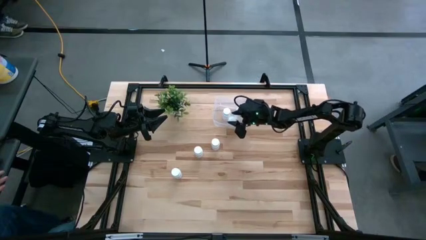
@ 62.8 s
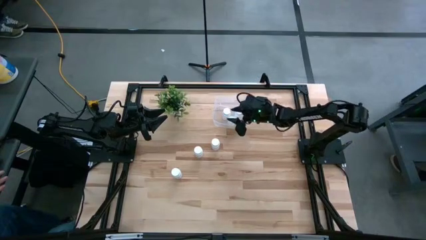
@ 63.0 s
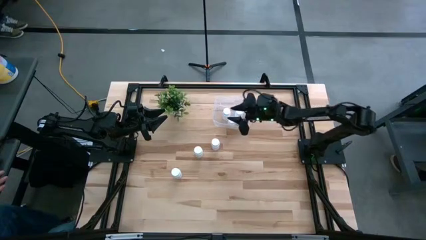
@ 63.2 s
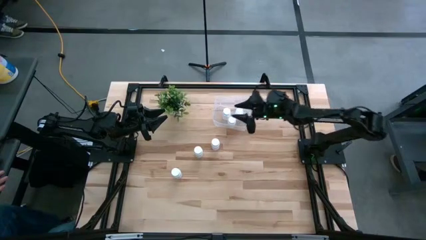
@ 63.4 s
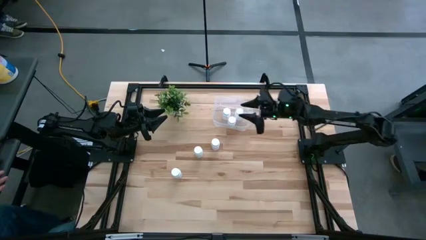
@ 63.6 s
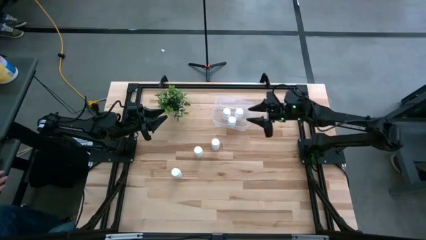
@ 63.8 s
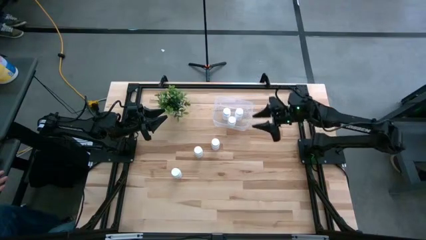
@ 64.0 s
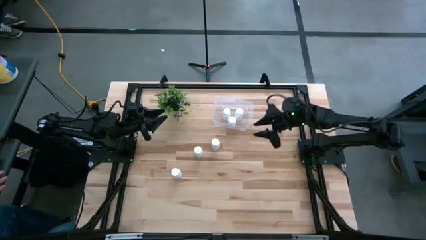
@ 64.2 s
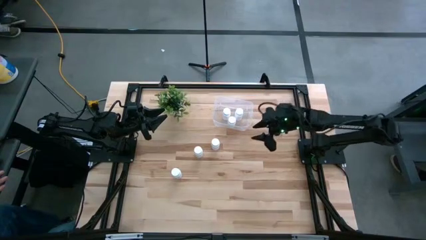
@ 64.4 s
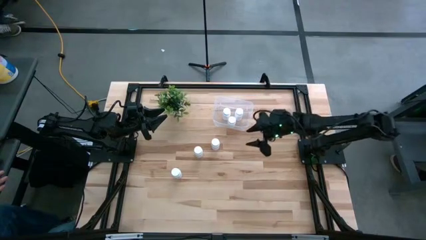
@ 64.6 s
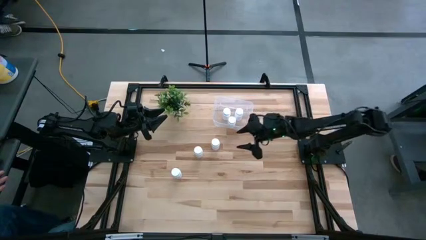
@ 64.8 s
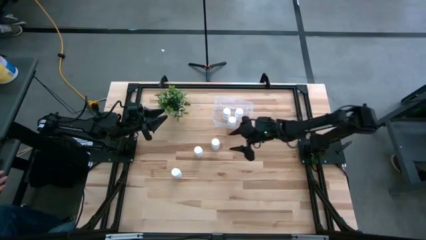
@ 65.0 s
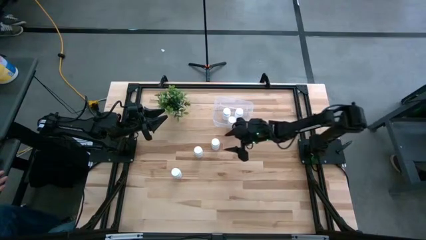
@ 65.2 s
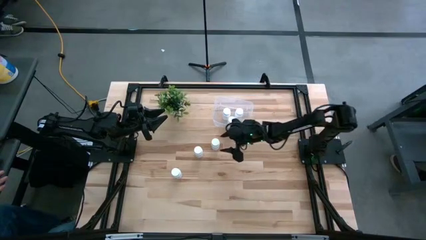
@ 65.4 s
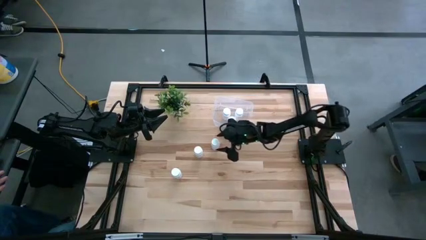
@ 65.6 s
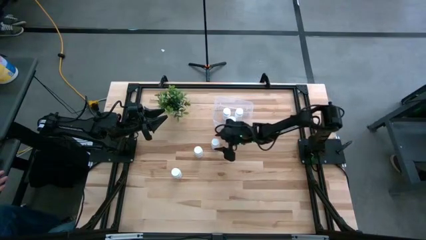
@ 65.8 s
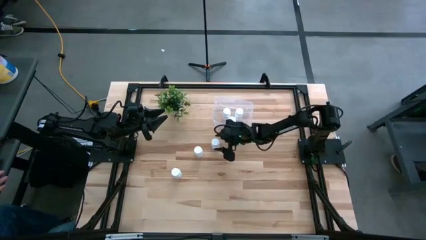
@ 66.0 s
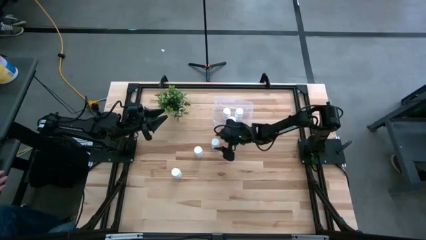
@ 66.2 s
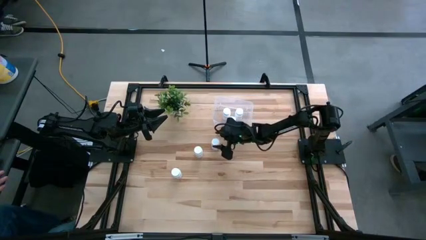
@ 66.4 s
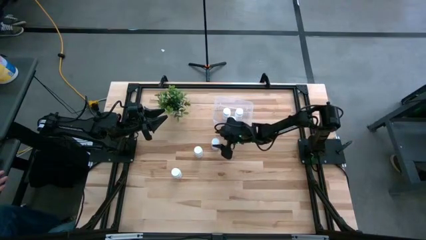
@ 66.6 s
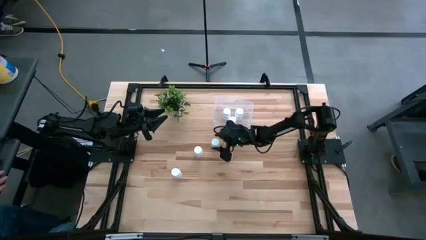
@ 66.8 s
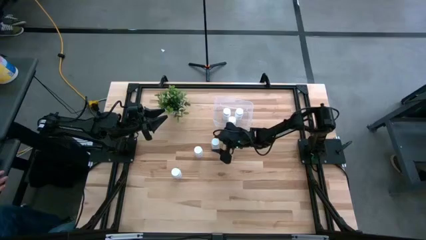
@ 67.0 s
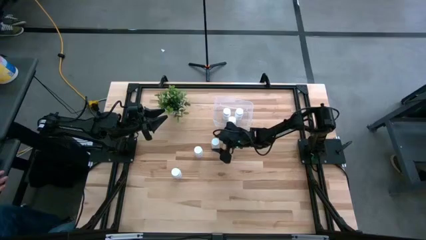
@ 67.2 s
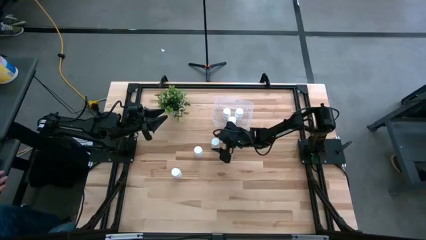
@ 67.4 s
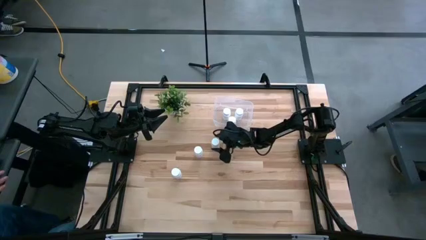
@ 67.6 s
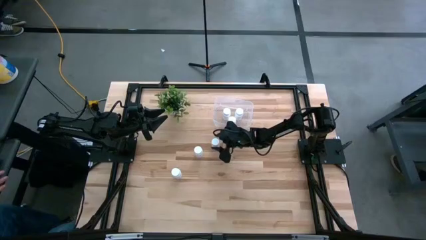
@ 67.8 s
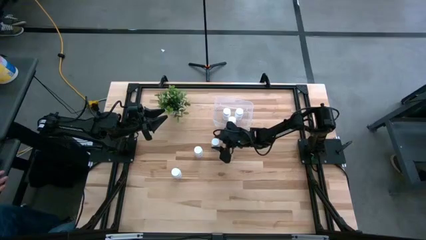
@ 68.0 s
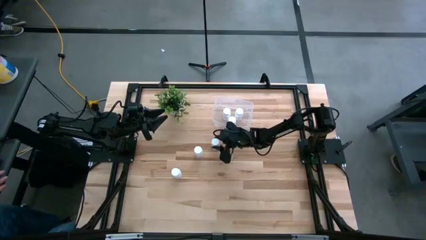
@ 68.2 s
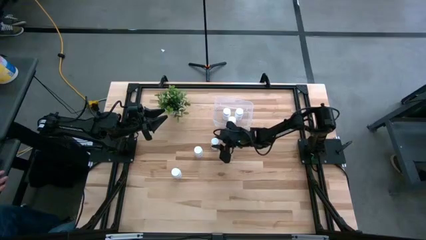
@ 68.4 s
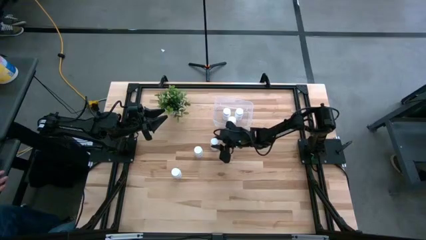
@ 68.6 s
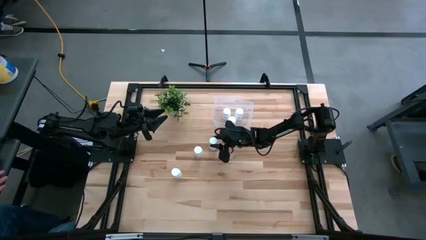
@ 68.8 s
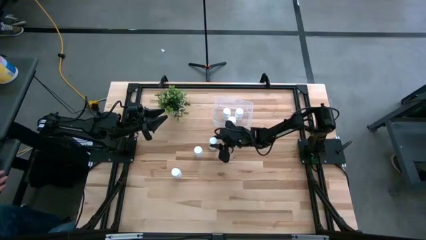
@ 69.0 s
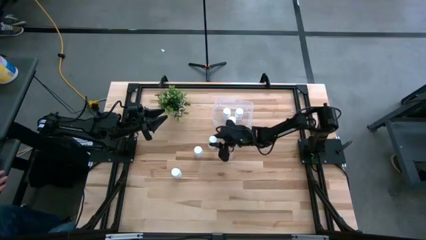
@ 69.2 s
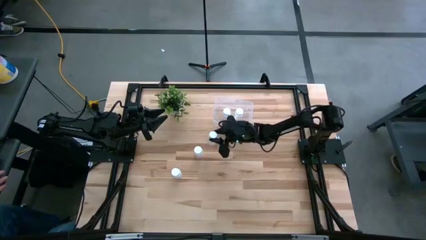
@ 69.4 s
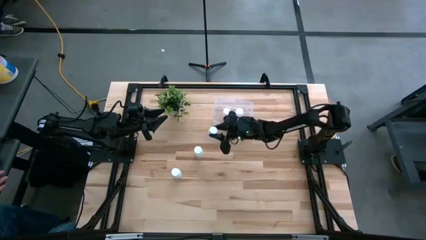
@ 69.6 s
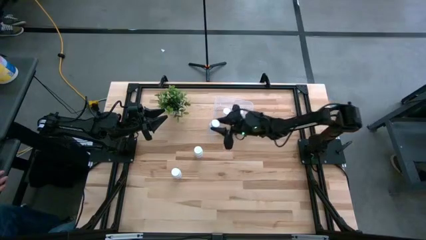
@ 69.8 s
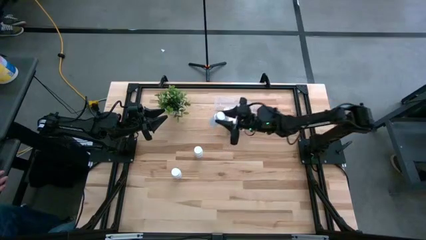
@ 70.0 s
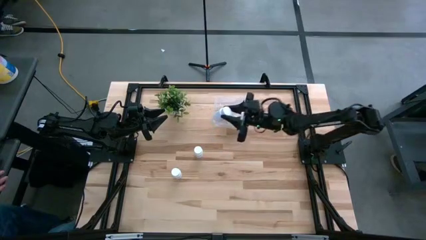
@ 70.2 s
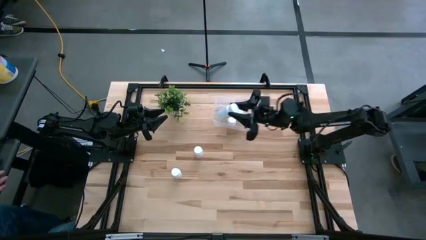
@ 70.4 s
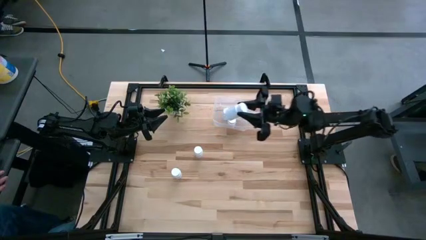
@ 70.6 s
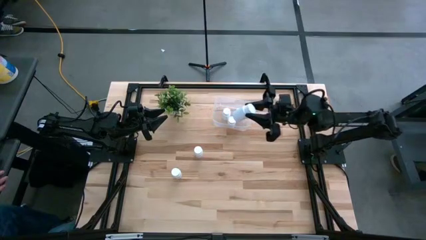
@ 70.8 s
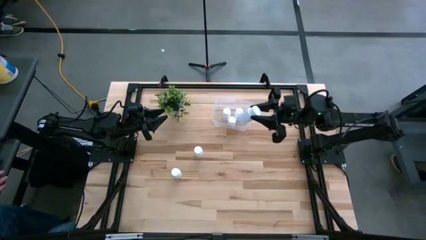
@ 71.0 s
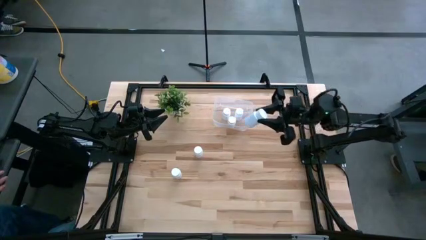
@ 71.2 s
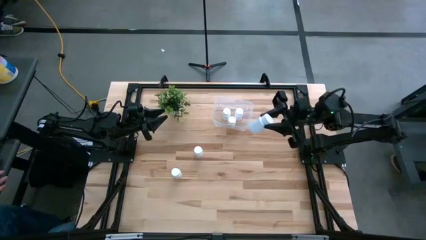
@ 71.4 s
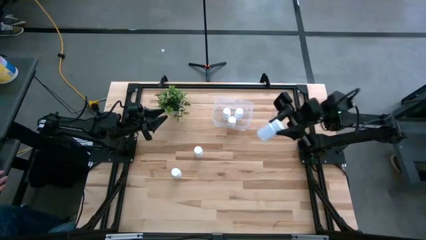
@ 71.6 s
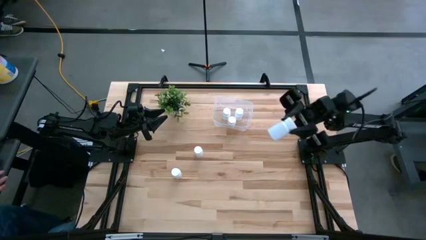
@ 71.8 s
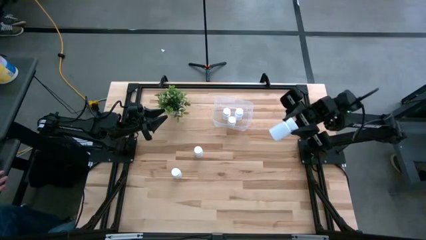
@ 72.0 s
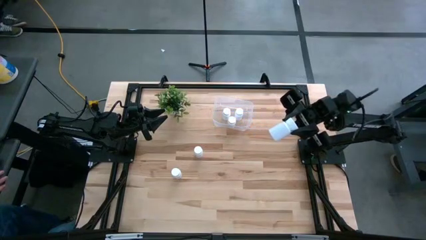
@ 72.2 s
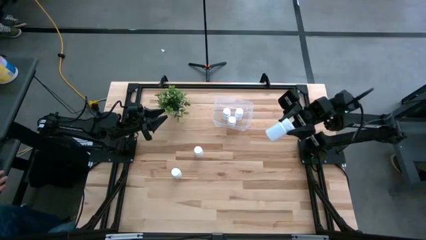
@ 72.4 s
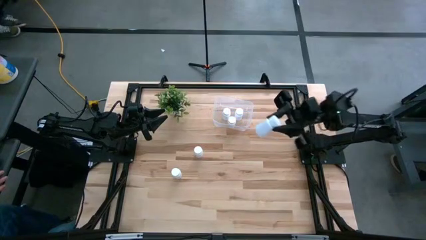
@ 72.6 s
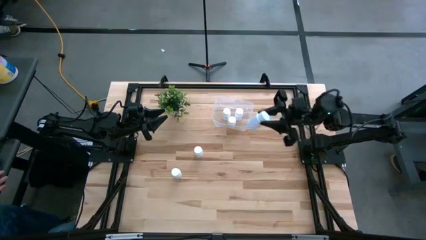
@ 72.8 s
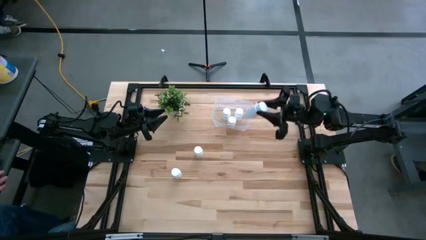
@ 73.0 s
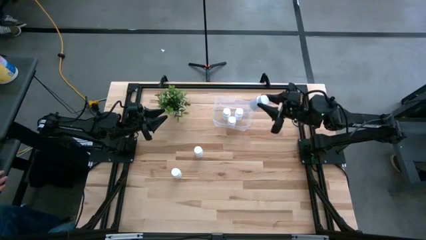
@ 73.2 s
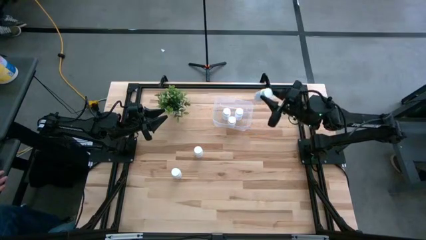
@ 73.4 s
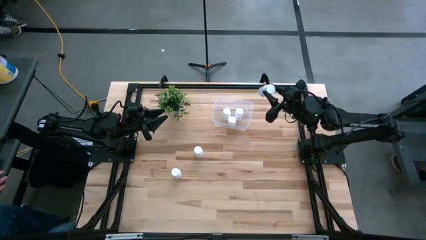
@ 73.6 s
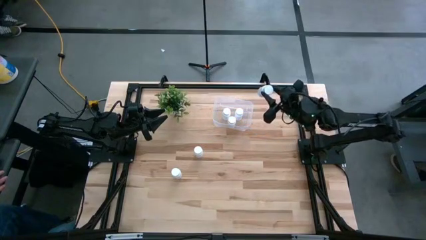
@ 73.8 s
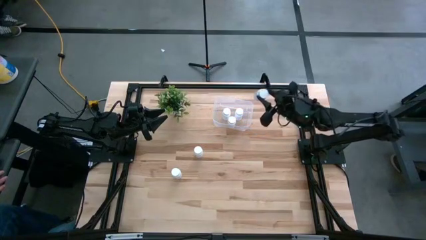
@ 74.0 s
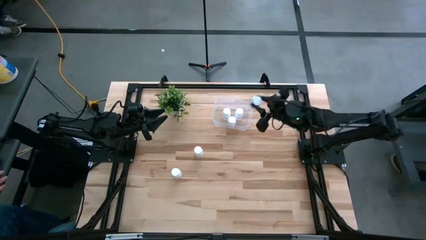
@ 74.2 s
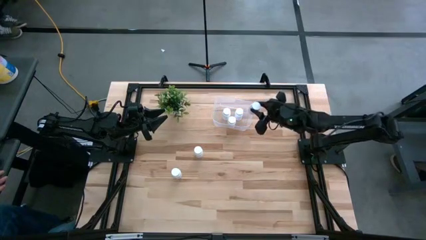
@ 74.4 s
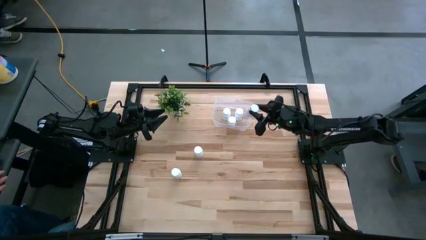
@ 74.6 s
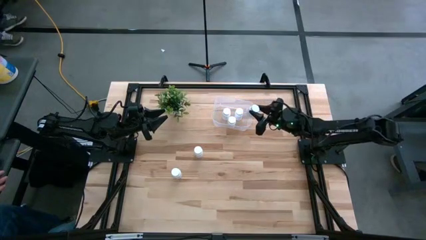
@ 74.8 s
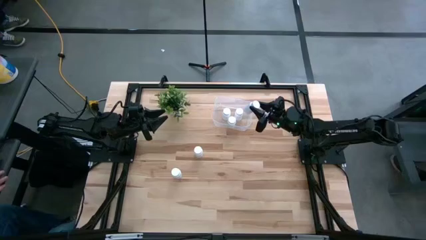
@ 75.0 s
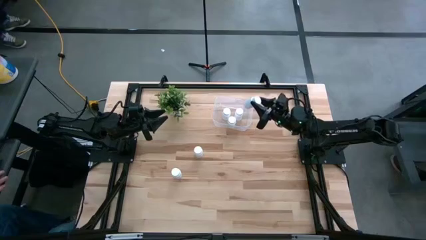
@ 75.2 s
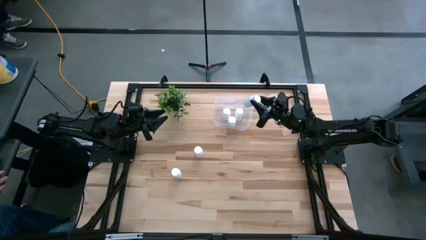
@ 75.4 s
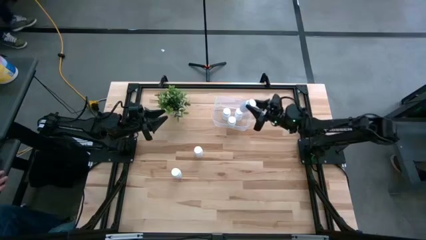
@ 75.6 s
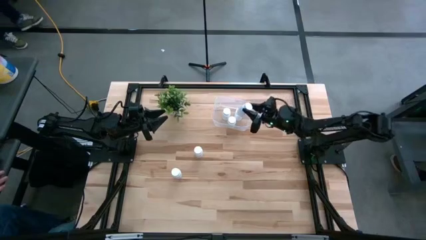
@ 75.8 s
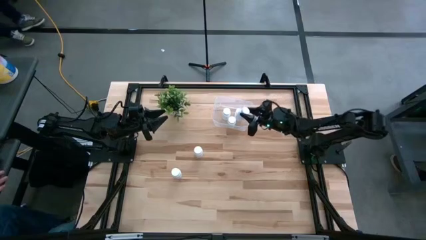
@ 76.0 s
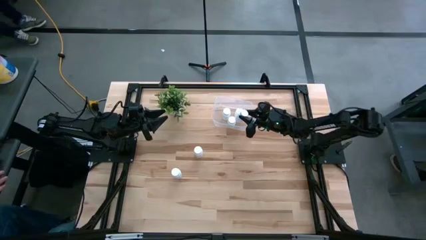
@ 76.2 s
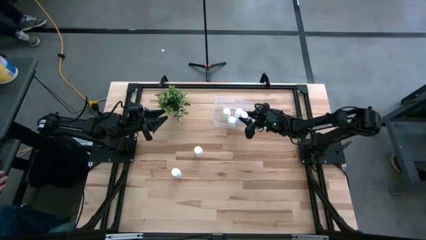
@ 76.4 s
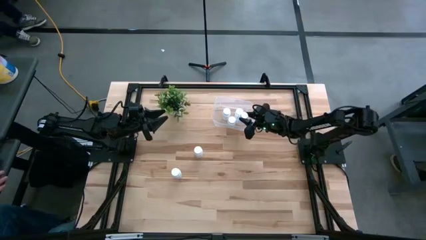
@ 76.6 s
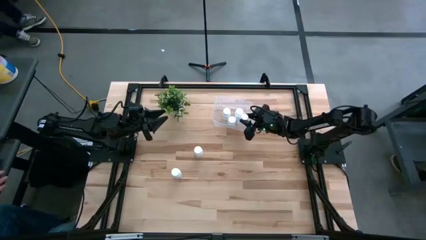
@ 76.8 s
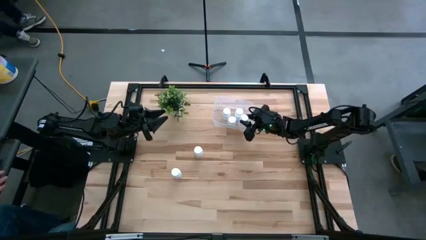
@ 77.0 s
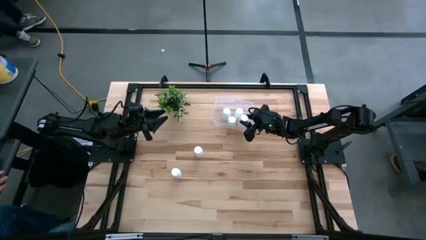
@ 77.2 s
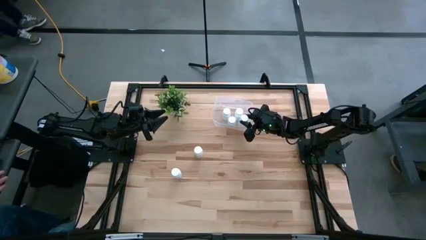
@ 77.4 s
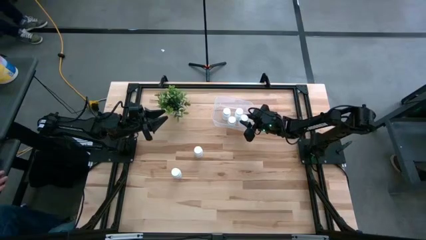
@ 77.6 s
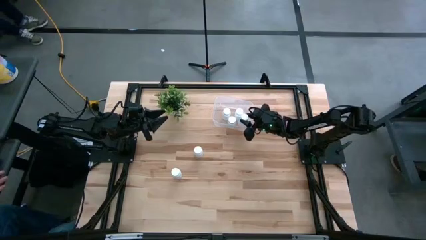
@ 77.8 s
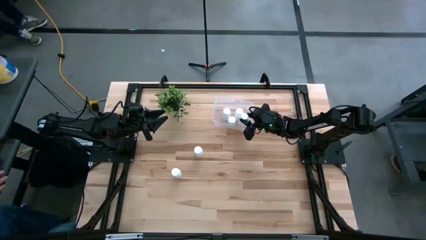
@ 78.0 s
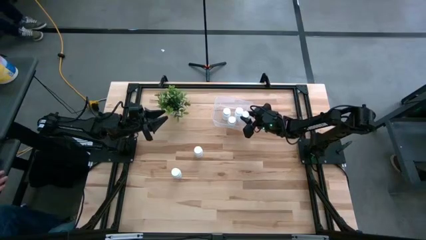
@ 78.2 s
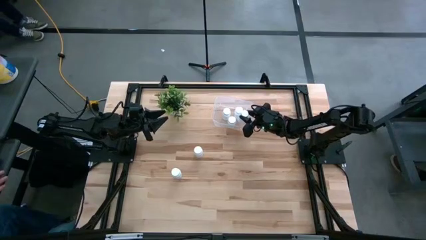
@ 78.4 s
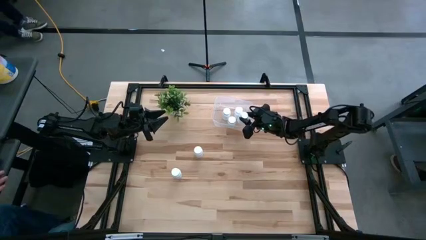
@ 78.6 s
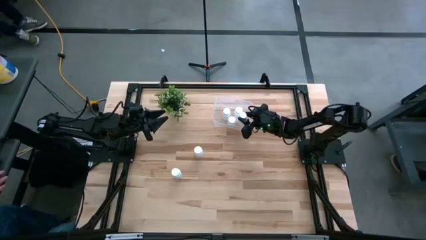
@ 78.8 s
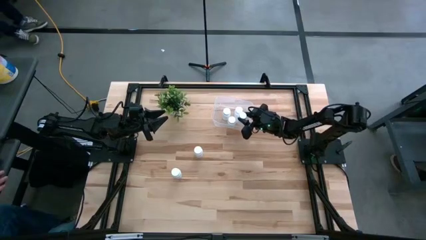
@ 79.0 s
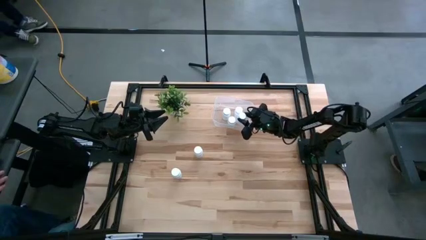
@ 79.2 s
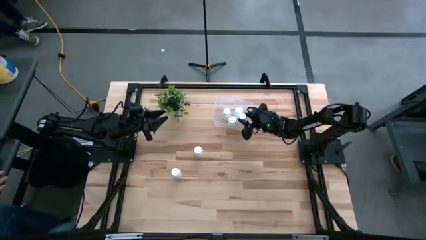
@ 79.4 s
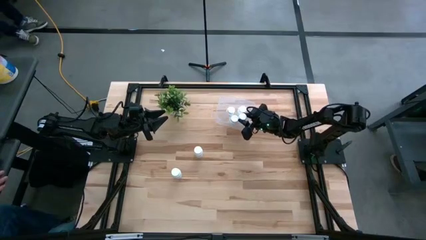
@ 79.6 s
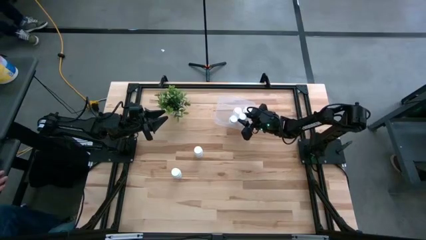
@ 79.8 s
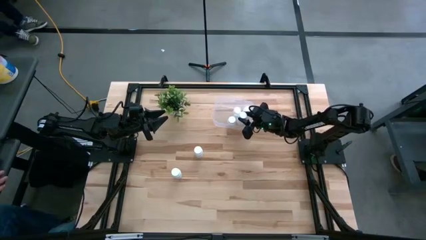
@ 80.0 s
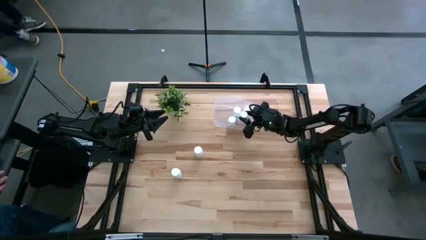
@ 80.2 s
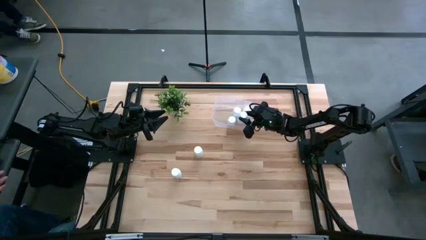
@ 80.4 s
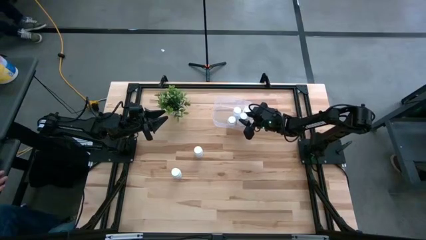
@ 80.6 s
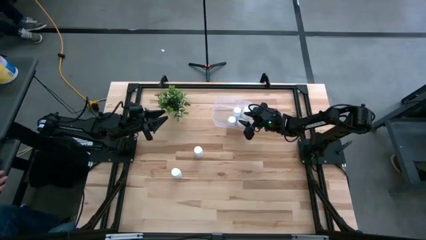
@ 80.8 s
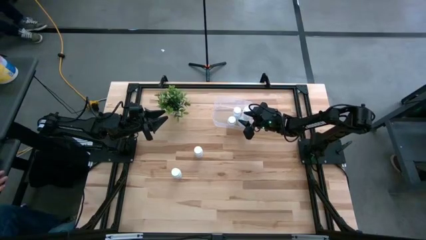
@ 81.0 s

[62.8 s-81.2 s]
Task: Pick and place pill bottles into a basket
Put the white pill bottle into the transparent container
